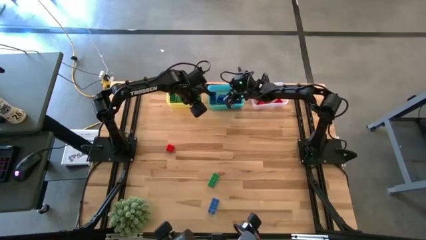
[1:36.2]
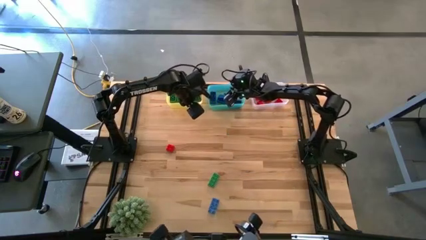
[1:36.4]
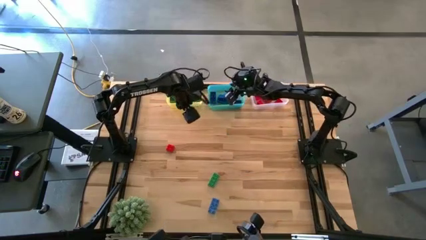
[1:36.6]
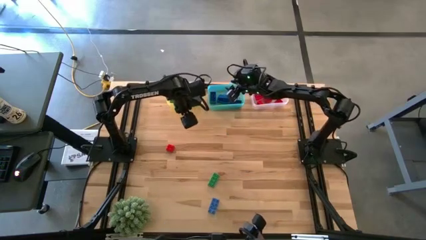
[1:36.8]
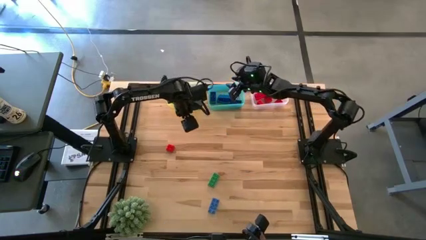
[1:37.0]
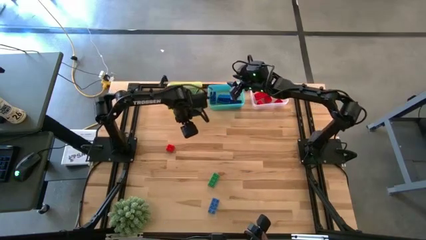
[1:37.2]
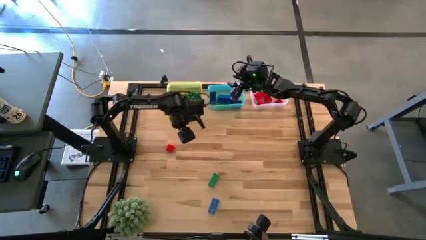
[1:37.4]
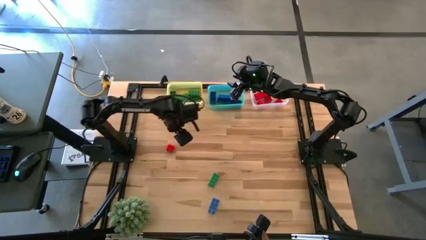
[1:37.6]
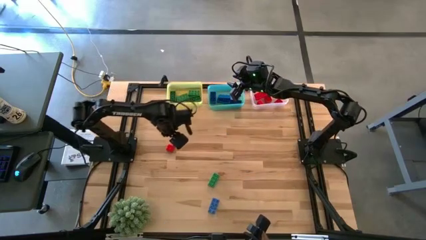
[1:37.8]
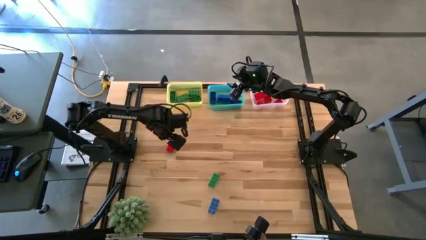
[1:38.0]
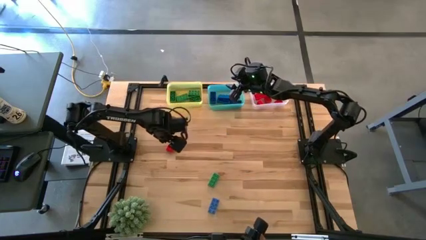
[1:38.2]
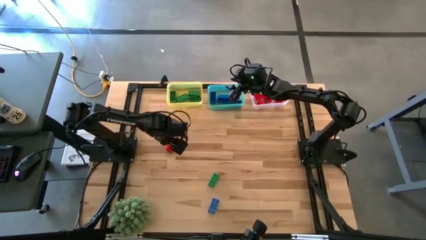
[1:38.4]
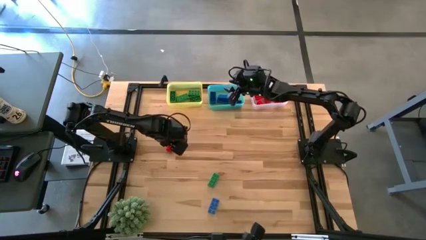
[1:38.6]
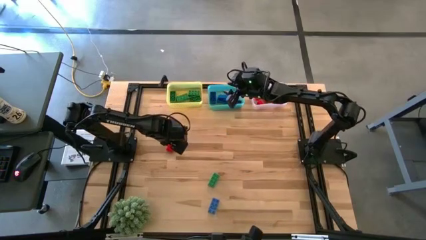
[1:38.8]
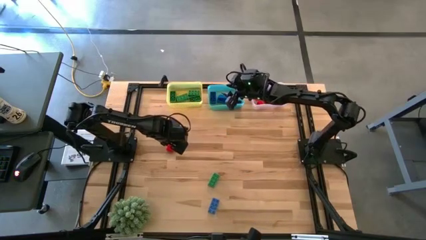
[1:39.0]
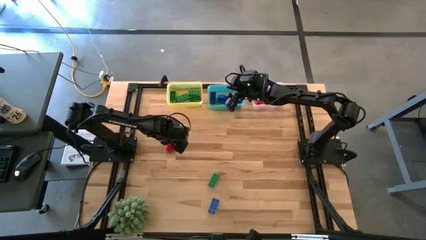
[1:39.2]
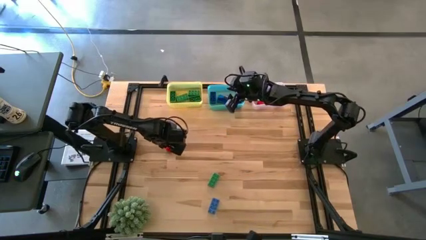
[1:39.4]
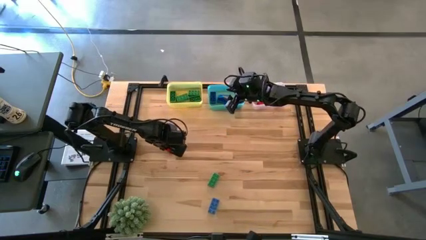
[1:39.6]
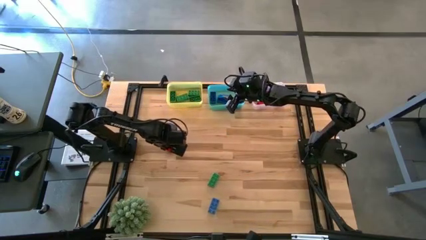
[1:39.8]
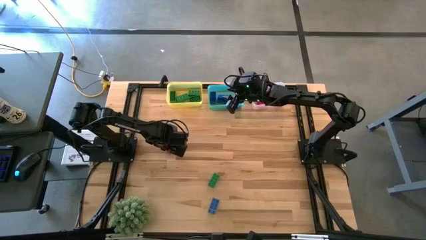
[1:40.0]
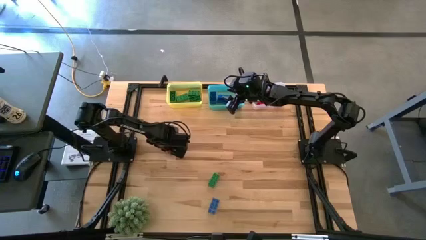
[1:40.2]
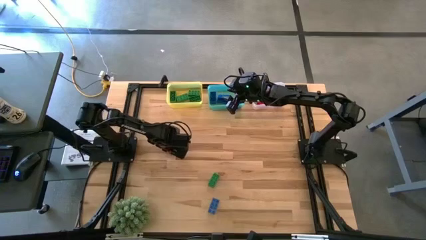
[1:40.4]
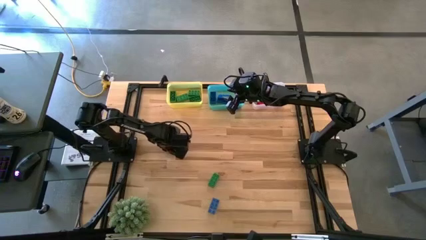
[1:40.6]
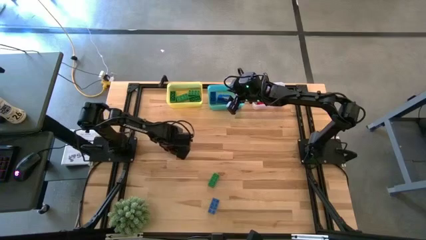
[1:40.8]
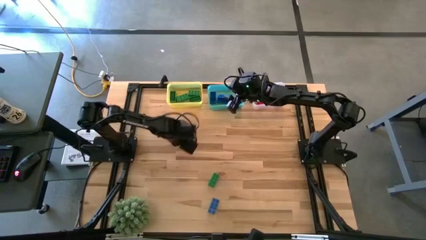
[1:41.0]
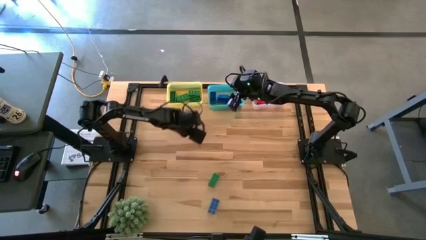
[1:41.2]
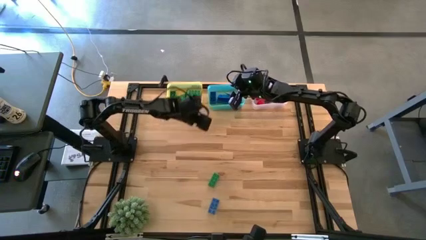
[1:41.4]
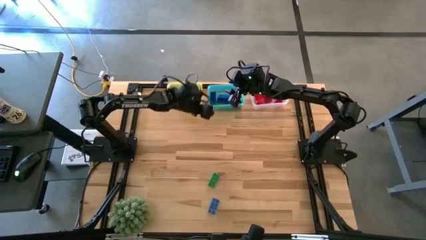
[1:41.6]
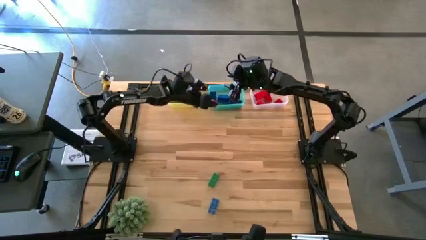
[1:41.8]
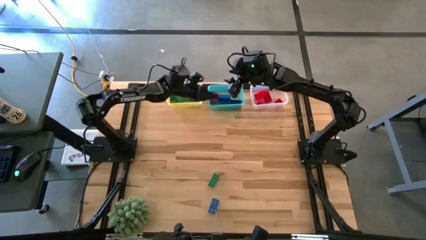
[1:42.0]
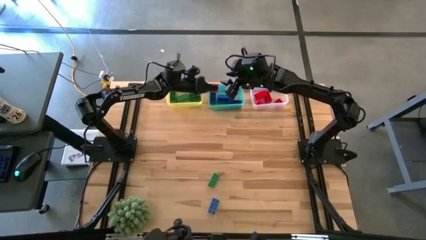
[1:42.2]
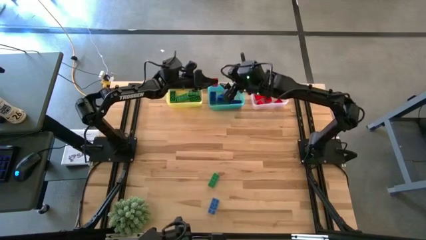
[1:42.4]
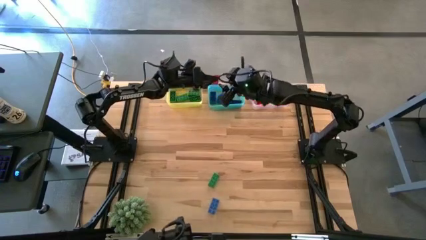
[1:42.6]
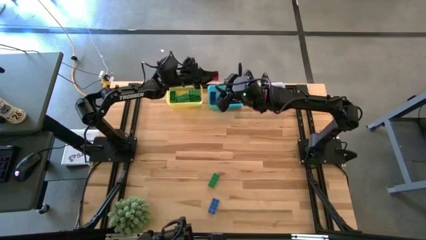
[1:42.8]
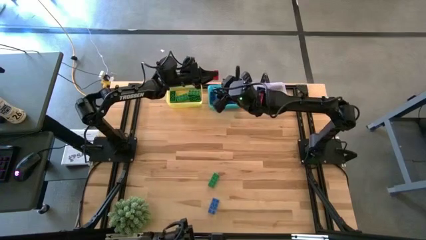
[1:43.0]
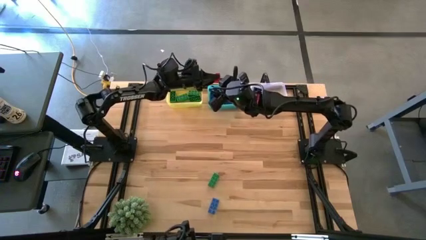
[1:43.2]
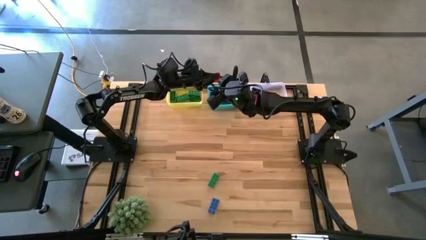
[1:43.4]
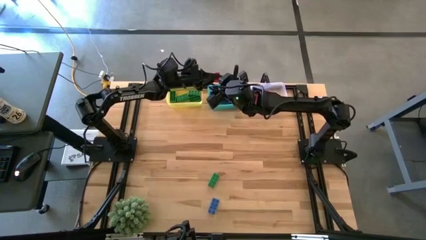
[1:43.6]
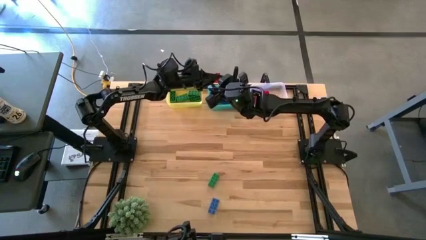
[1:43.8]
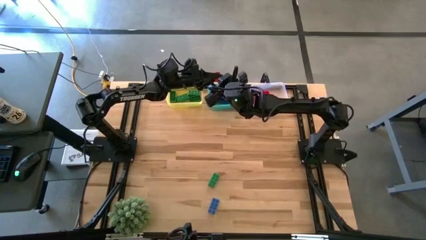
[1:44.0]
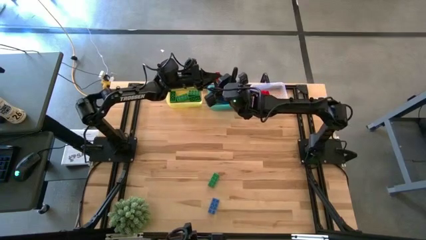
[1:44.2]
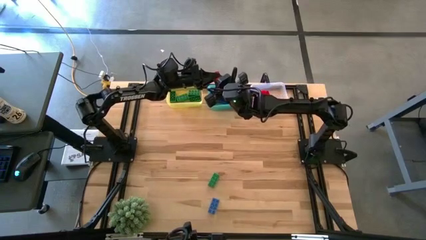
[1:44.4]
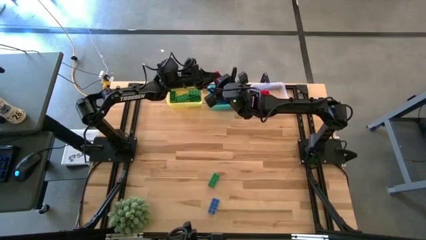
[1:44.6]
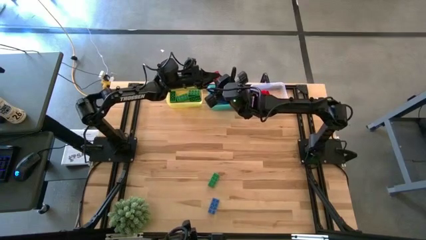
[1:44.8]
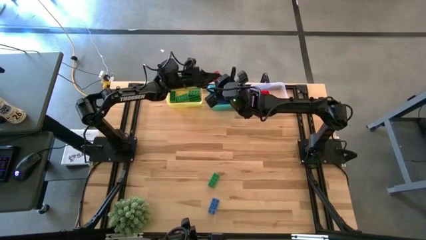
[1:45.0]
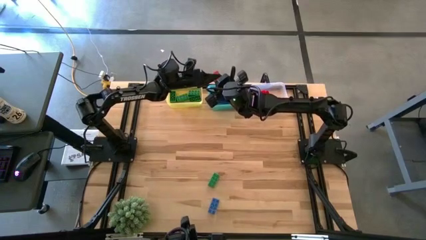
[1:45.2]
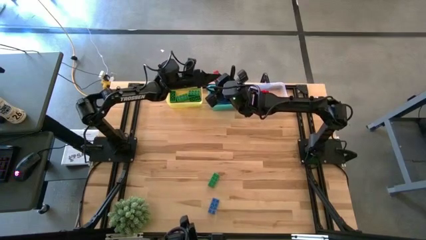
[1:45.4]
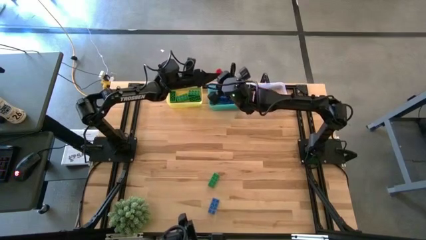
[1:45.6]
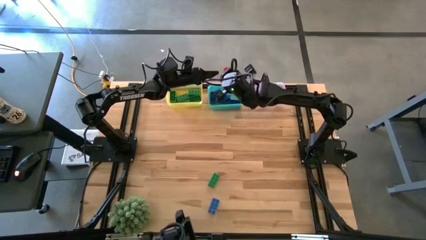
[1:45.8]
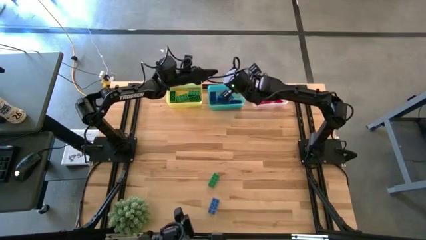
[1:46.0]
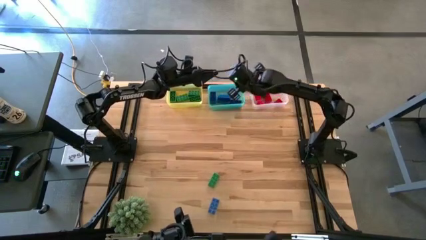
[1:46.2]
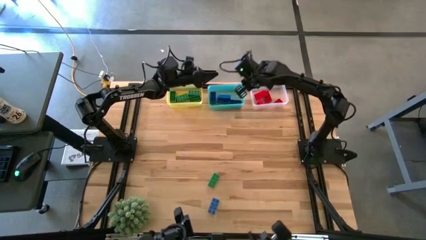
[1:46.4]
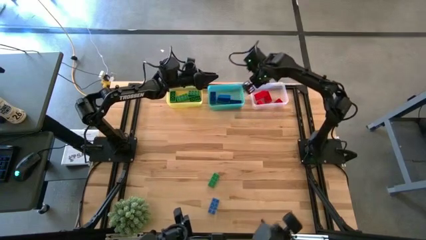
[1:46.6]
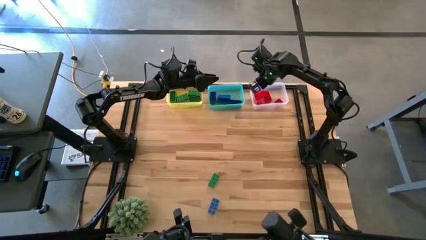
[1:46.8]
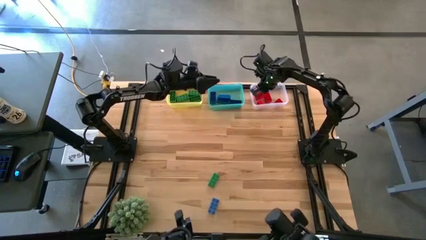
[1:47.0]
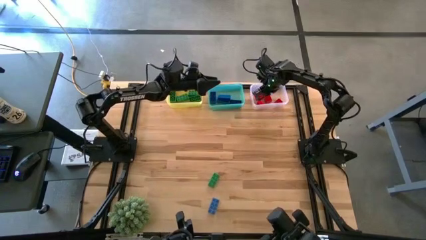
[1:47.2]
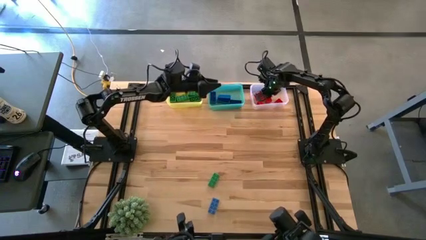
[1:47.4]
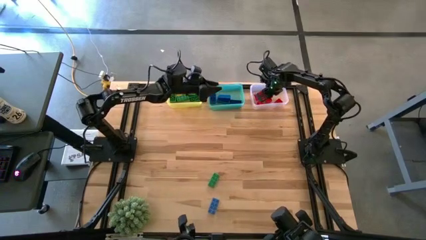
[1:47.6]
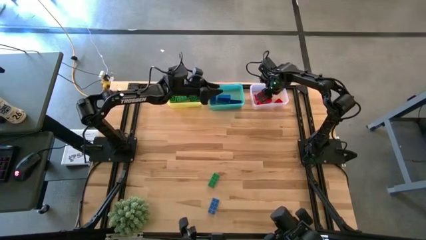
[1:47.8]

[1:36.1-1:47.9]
Task: Sort & place blocks by color
Put the red game piece into the white bin

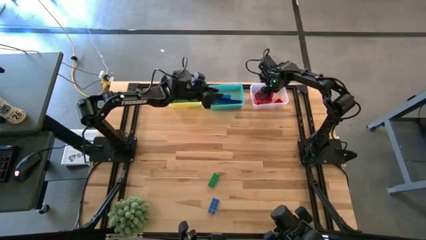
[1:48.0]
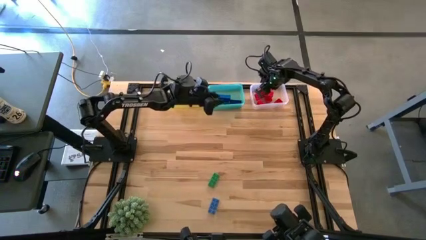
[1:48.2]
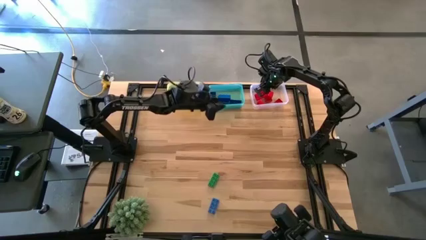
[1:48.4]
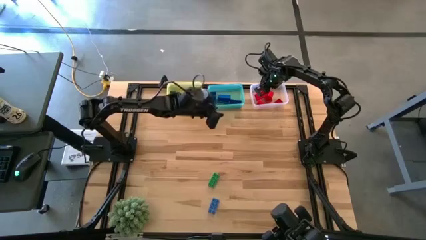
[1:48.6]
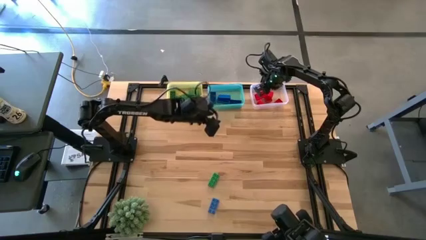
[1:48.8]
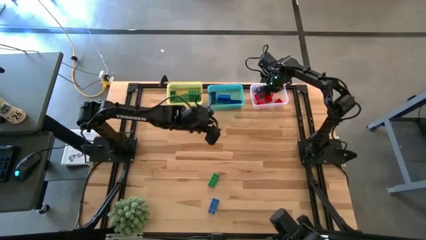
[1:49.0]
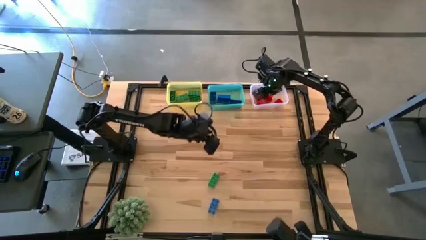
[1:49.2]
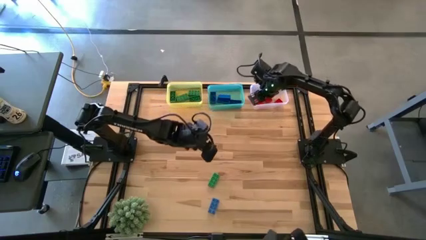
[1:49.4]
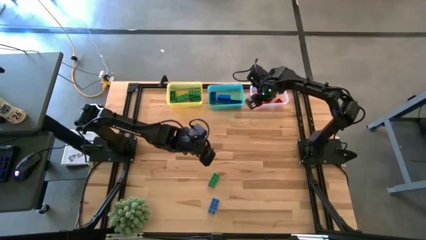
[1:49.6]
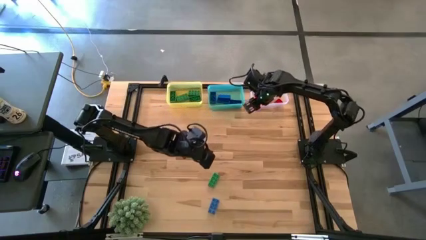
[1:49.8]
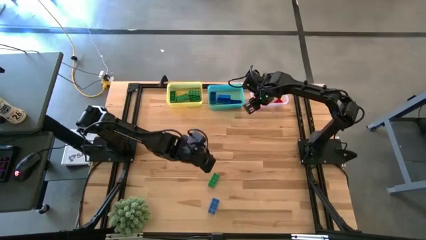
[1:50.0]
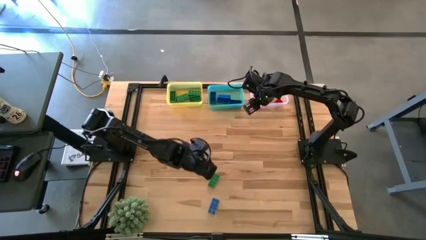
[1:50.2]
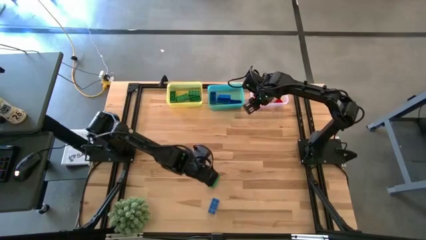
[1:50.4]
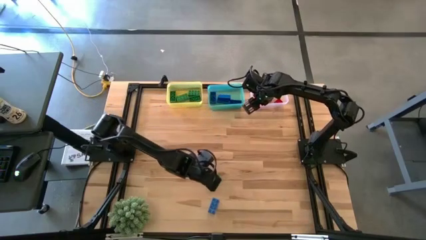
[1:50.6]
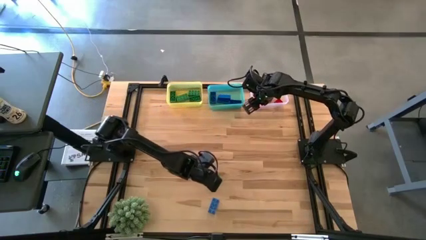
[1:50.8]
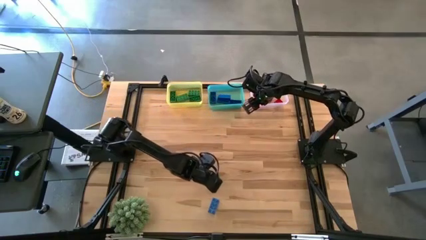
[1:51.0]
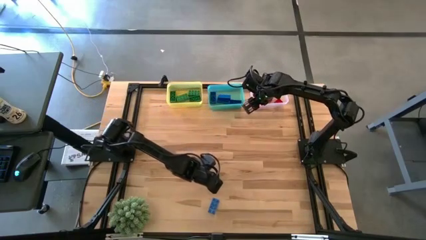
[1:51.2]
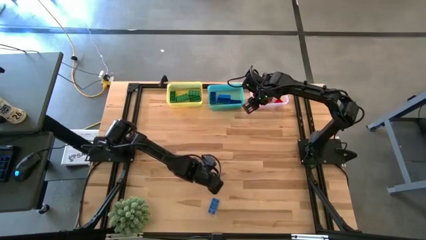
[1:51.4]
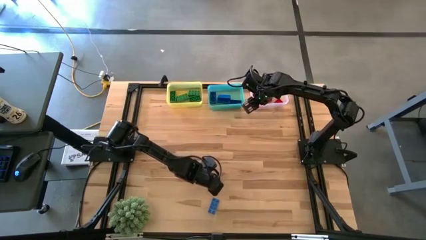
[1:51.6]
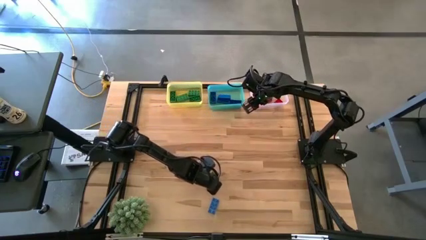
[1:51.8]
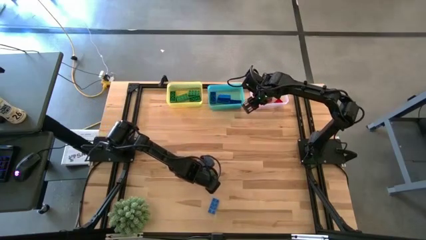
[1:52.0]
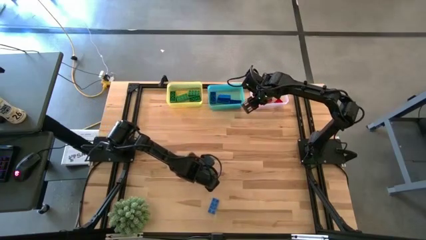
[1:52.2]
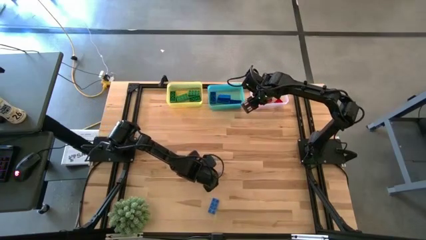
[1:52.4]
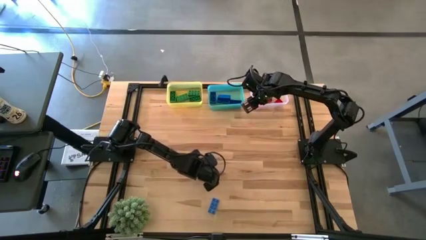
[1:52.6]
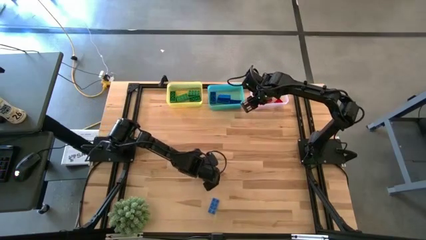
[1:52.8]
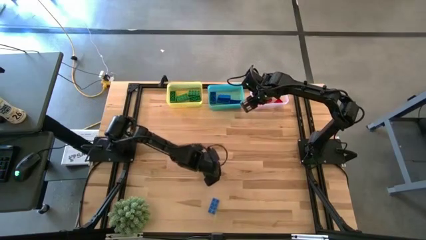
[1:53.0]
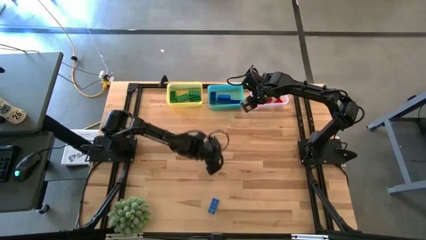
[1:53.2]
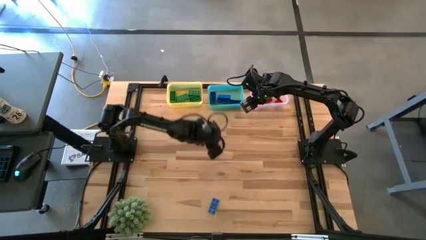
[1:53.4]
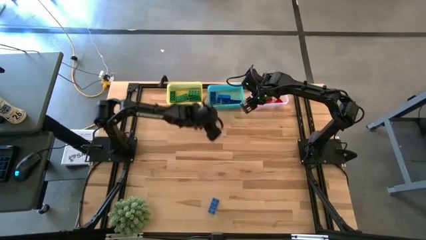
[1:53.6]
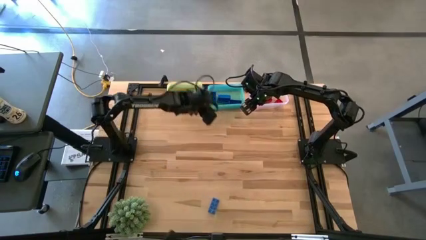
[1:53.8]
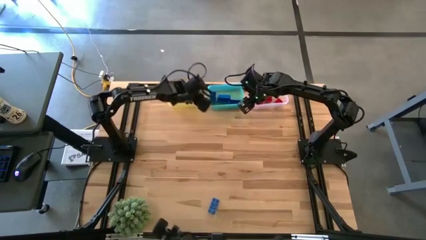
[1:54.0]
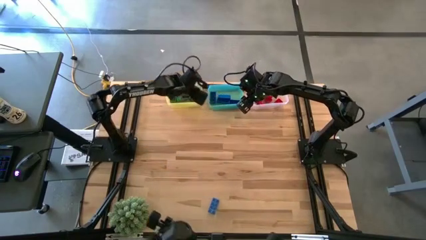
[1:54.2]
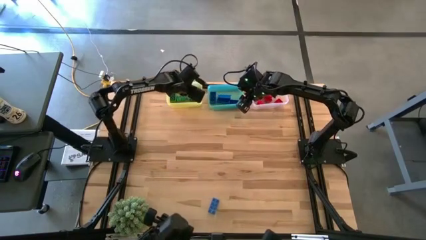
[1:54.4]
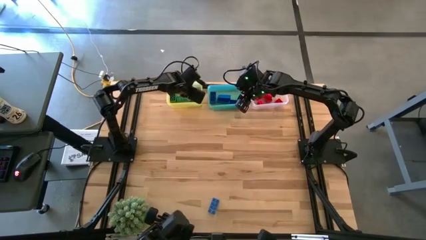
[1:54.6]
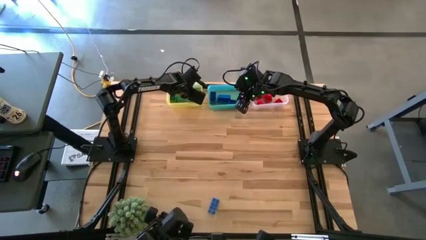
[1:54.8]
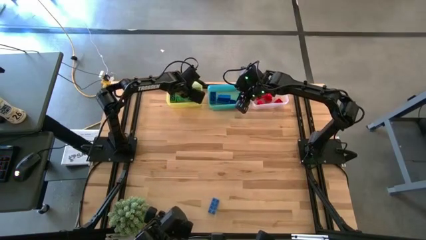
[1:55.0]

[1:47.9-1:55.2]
Put the green game piece into the yellow bin
